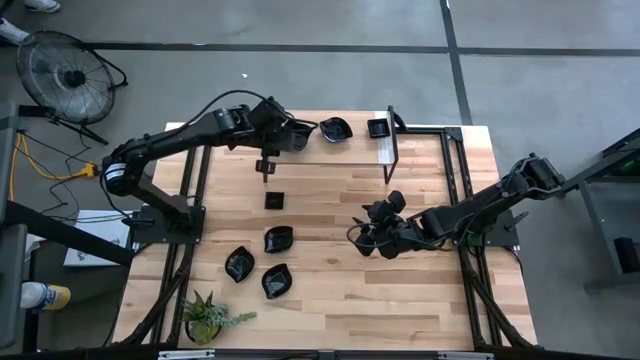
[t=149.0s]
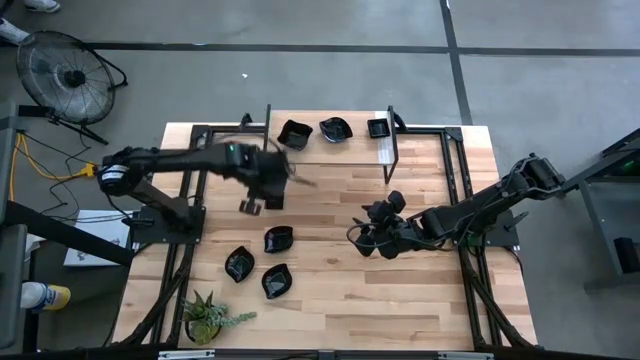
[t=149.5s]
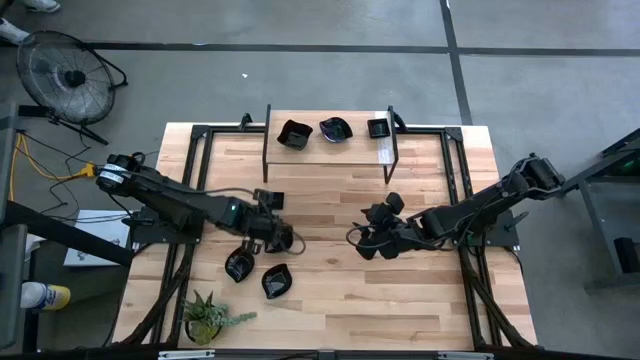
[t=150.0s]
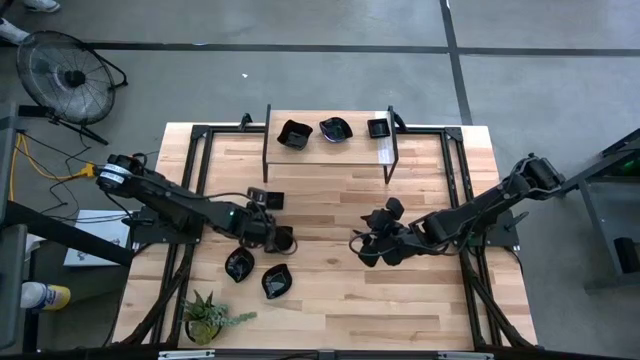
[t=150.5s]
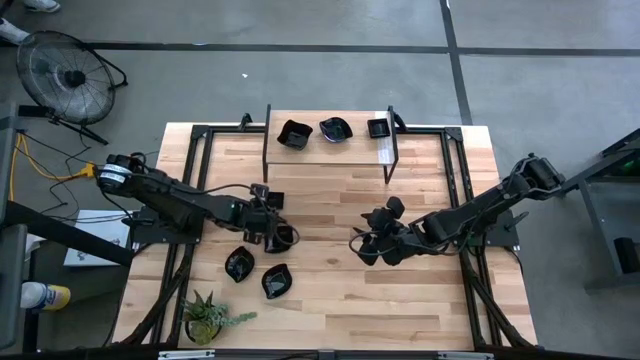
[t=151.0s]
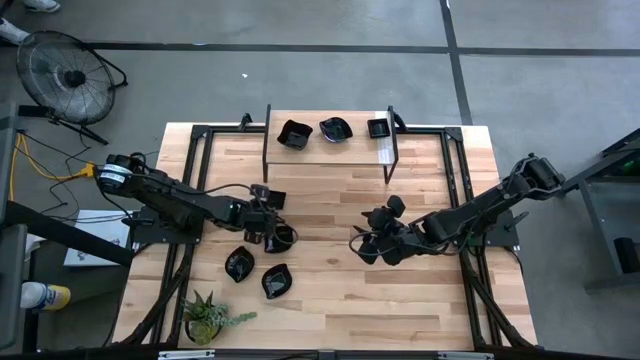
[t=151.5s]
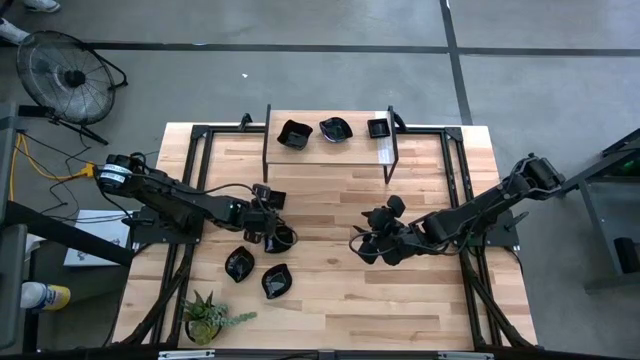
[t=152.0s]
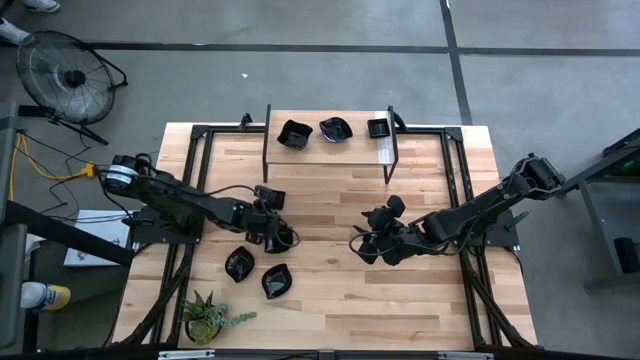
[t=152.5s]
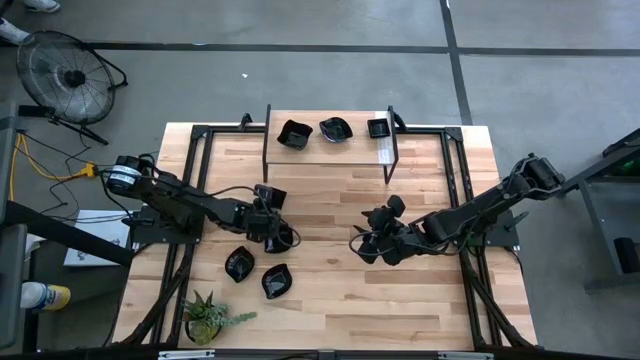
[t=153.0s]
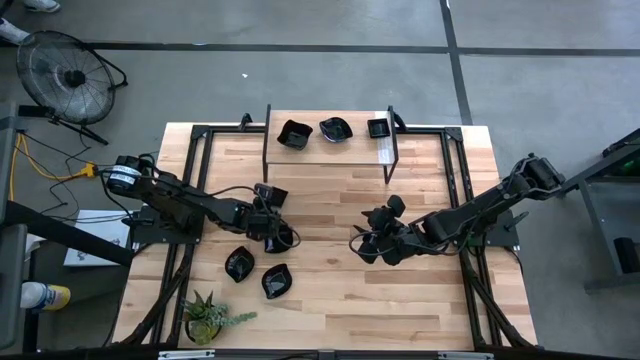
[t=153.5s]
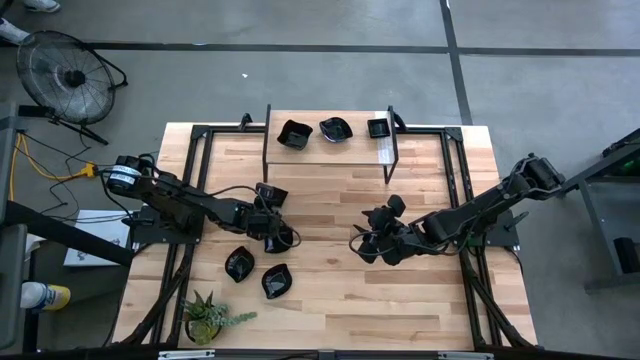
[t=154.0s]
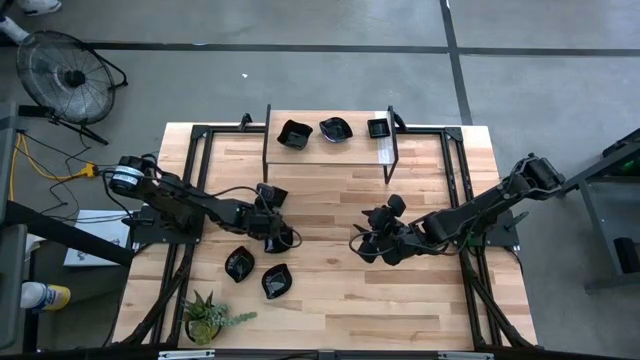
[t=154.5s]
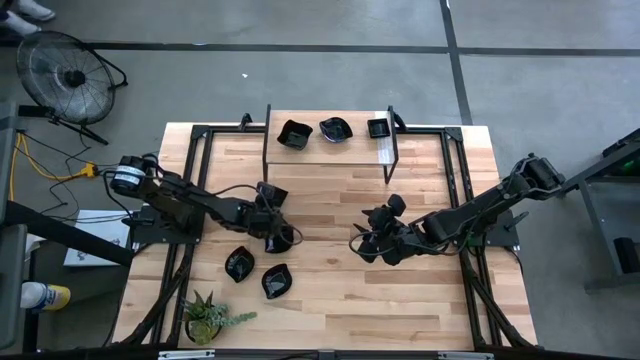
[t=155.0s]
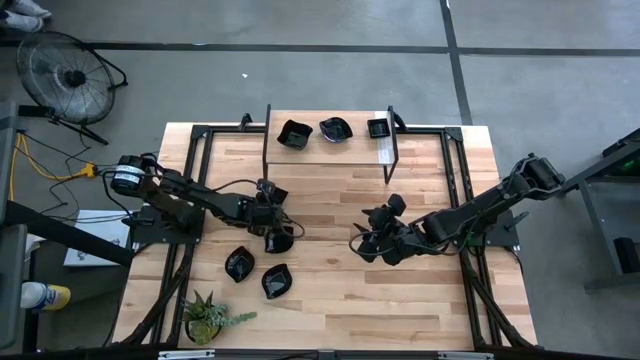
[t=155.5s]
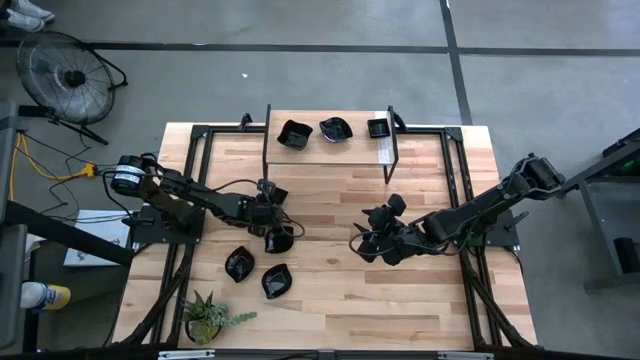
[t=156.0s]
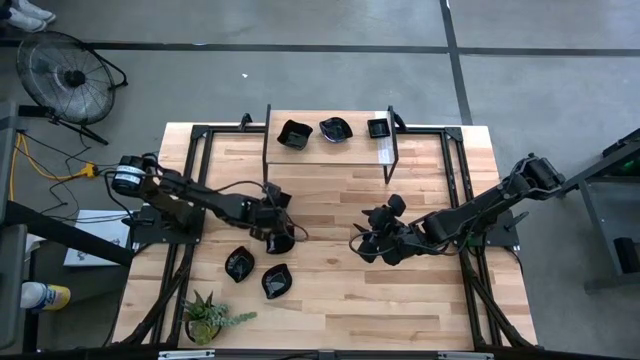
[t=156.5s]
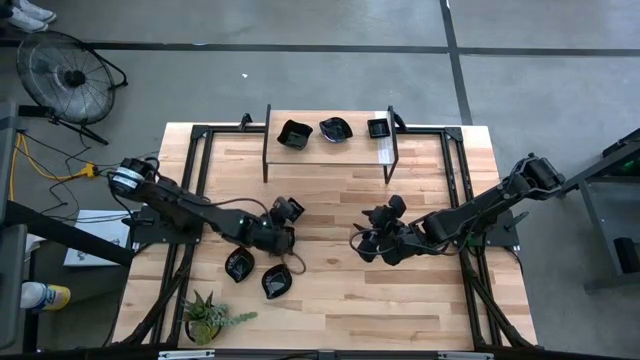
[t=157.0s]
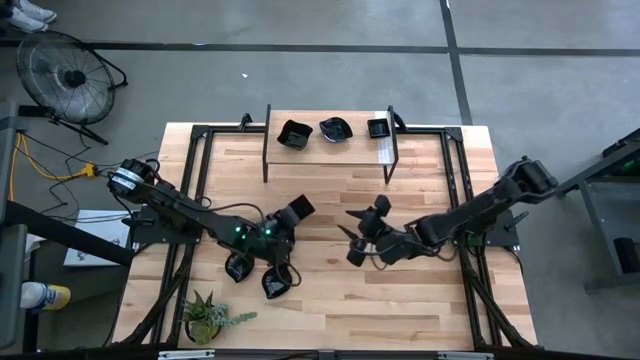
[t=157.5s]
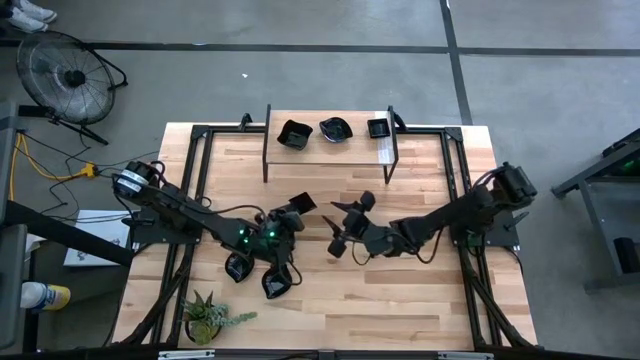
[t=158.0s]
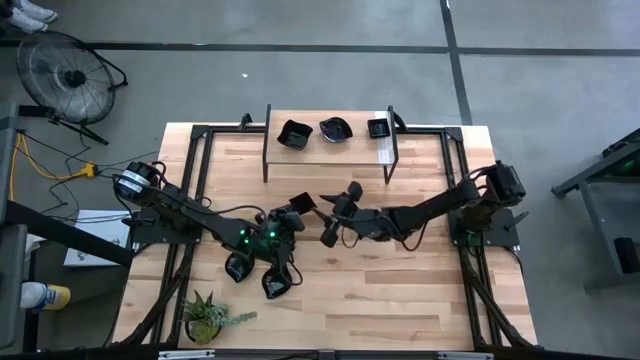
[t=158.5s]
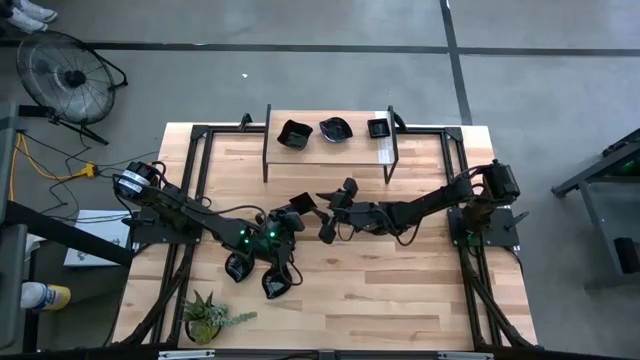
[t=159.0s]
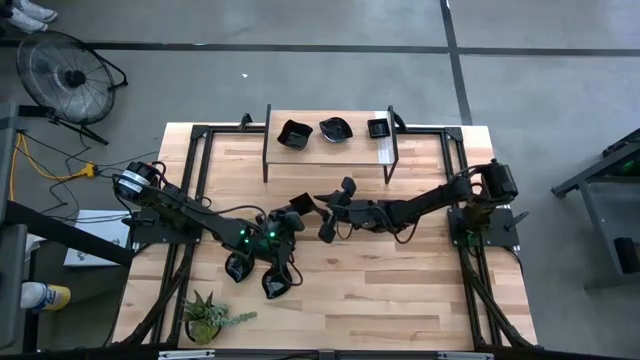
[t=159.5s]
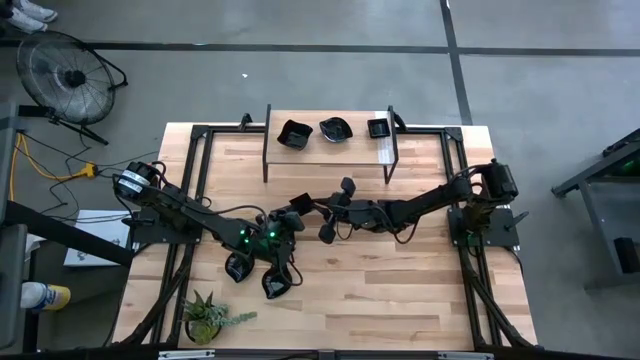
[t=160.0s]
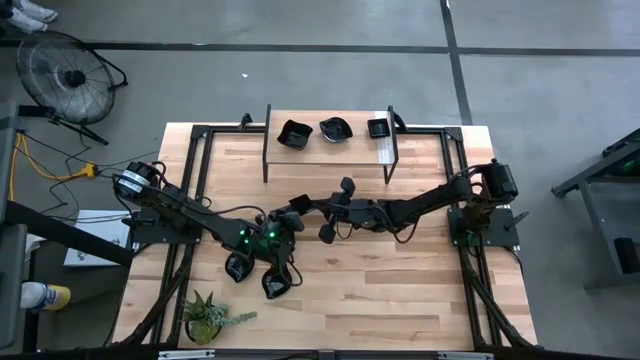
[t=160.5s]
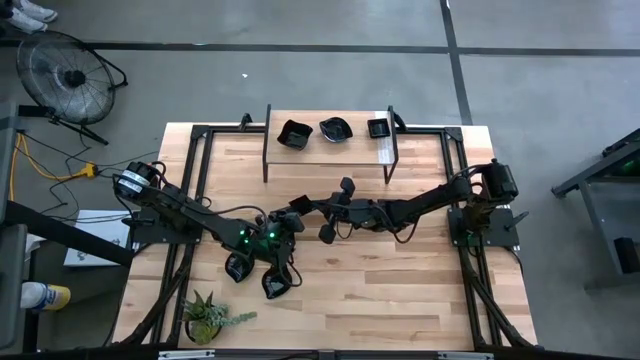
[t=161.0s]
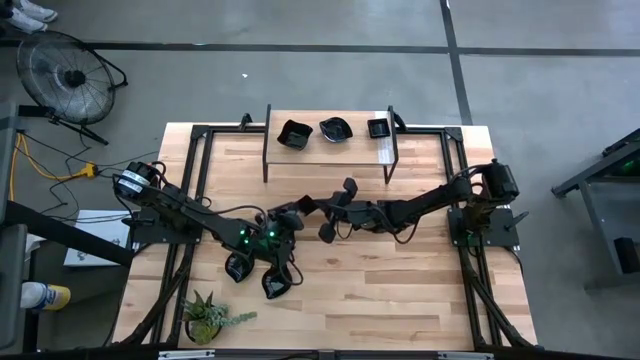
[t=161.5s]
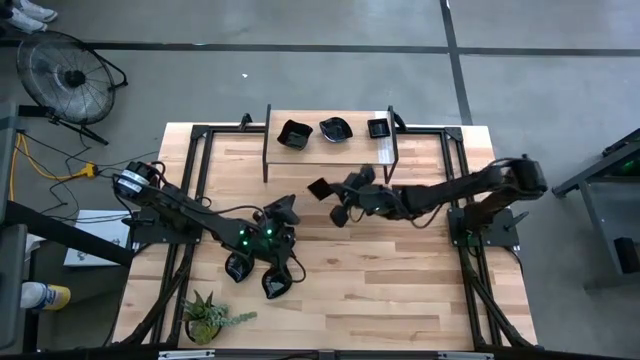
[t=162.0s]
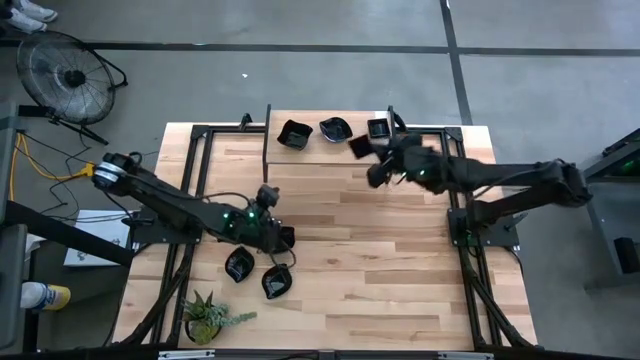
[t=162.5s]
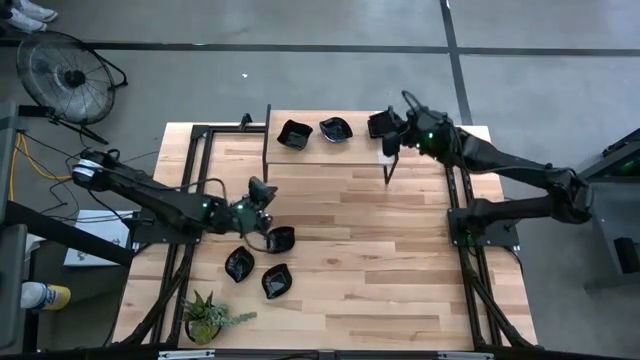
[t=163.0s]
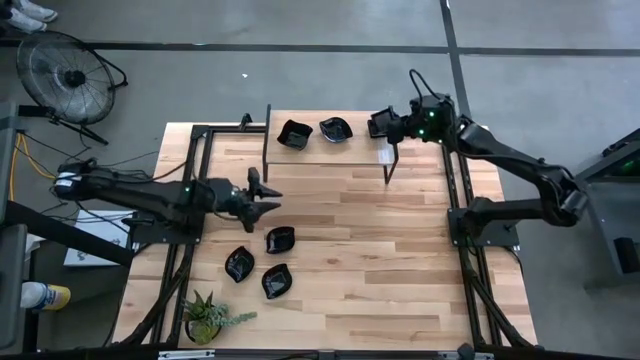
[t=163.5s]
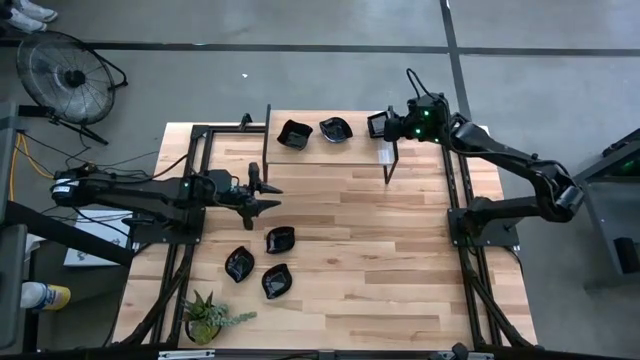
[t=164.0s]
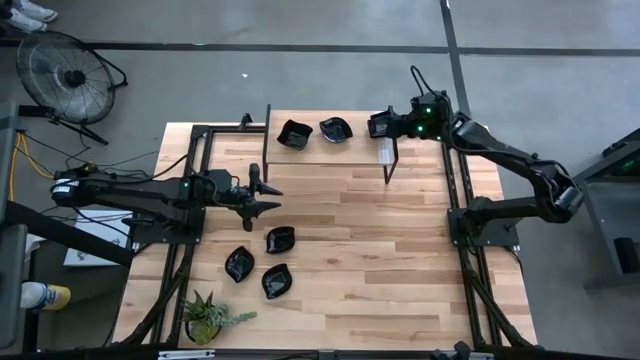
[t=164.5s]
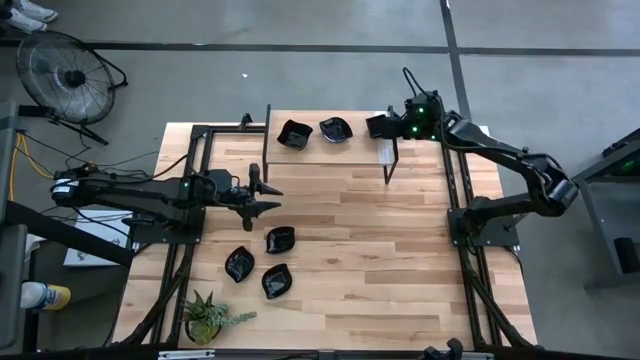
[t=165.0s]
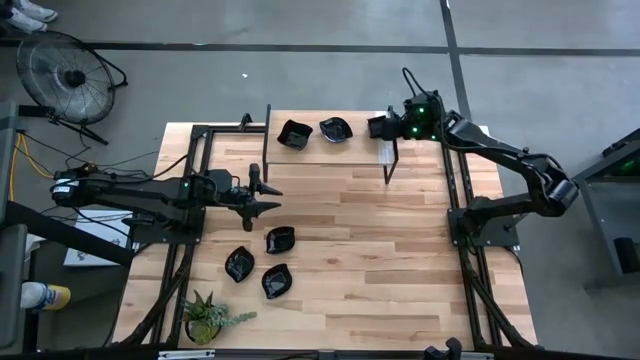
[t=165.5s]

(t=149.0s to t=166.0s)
Task: Pick & Place Mini shaped plates
Stack the black square plate on top of the black square plate on the shelf

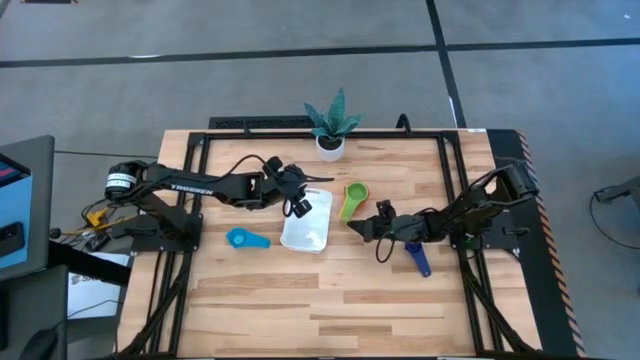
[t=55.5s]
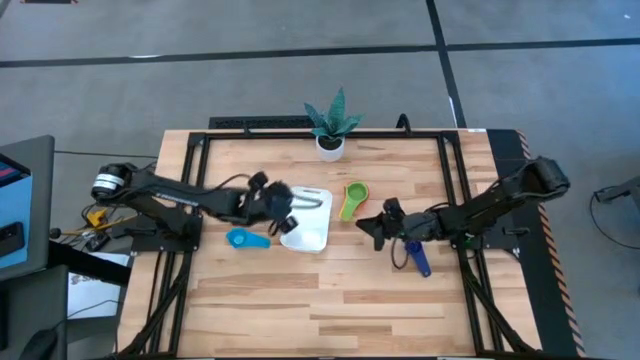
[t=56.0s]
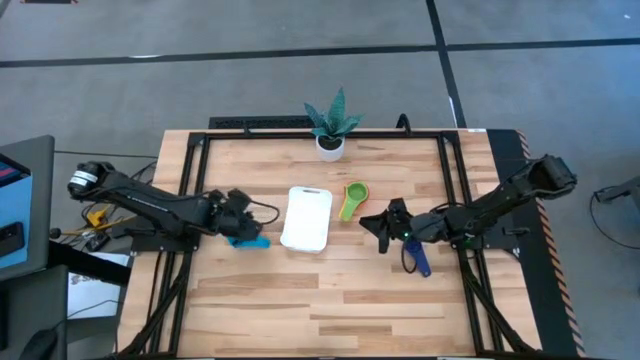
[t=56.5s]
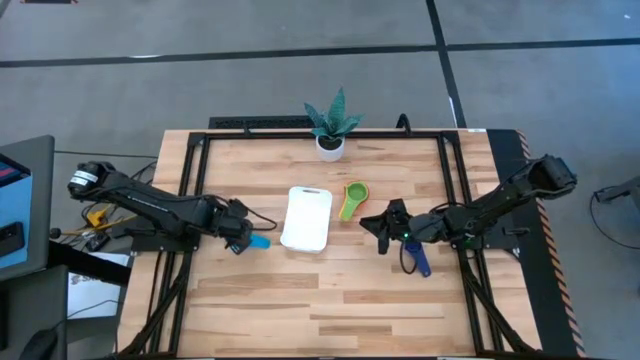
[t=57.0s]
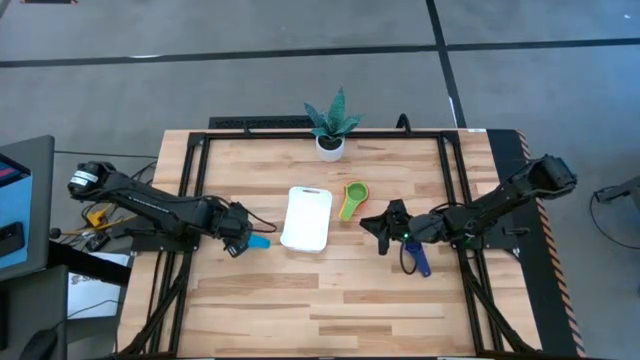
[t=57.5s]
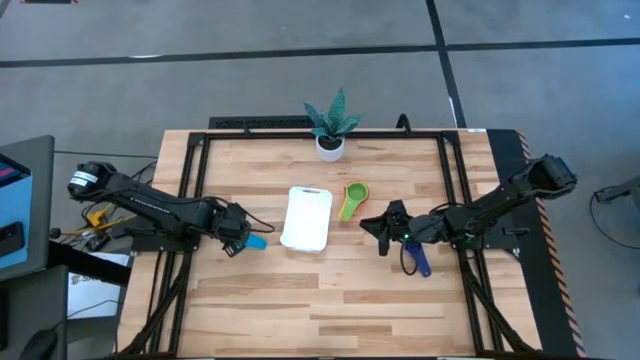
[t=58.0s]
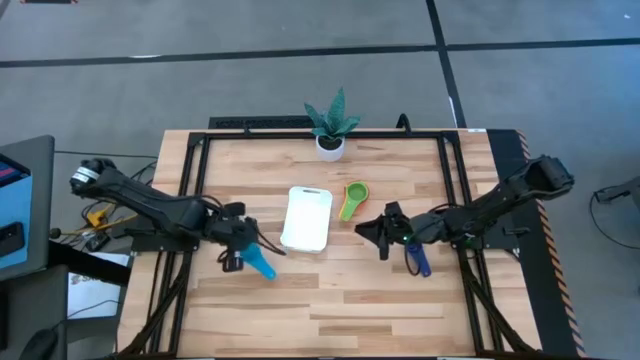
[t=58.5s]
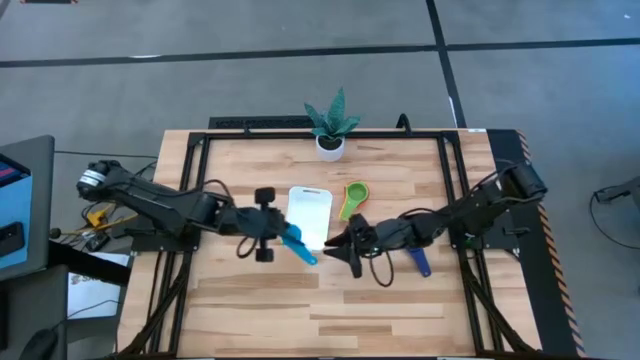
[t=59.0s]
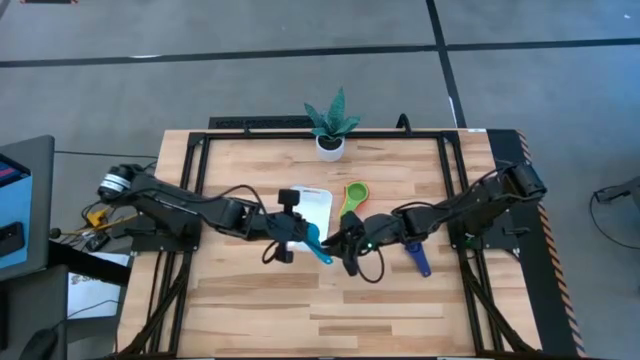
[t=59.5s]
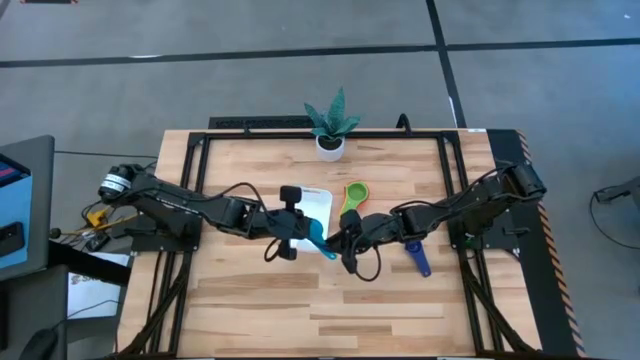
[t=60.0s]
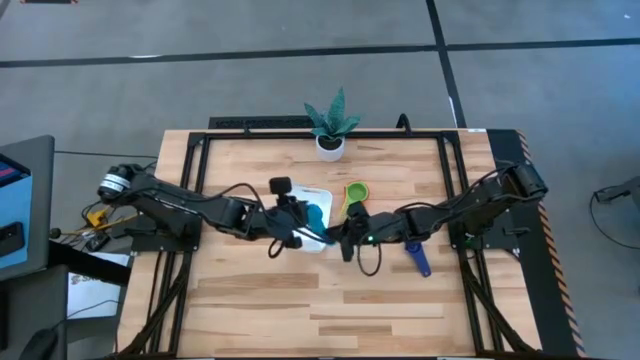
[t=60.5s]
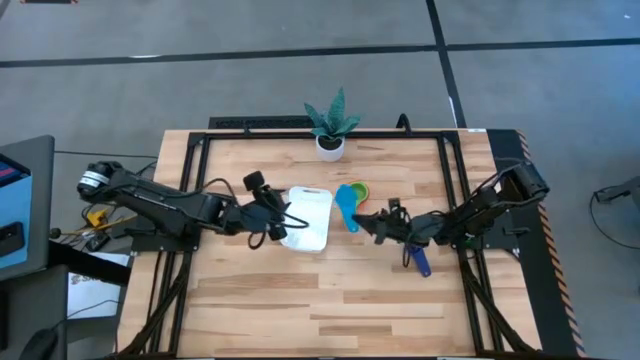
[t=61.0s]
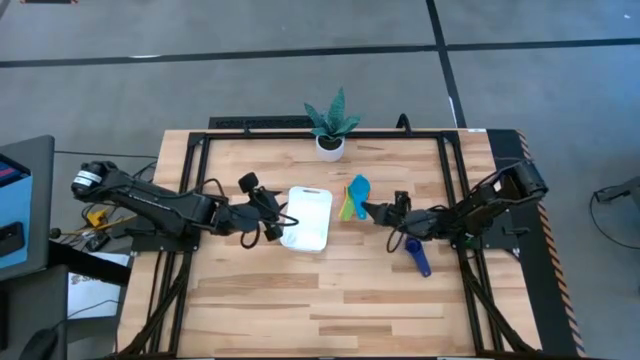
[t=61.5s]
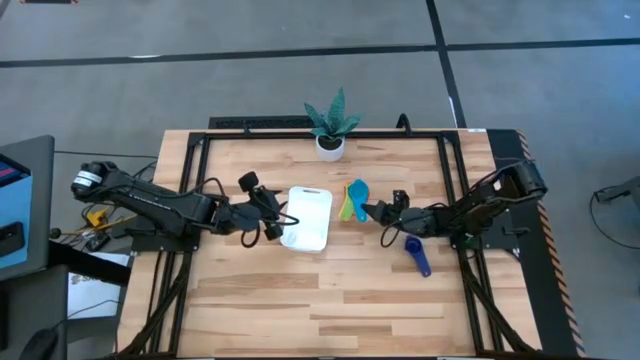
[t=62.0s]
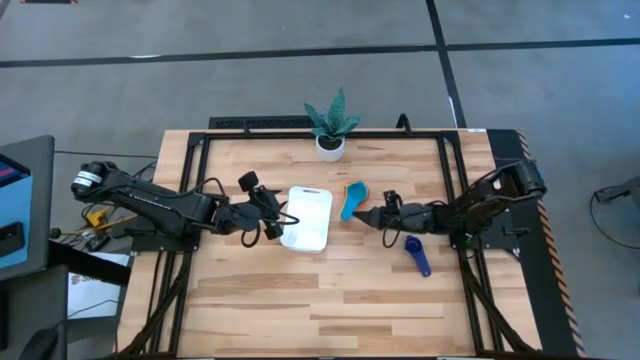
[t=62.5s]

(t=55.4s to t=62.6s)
Task: Nest measuring cups in basket
Stack the light blue measuring cup on top of the light green measuring cup
